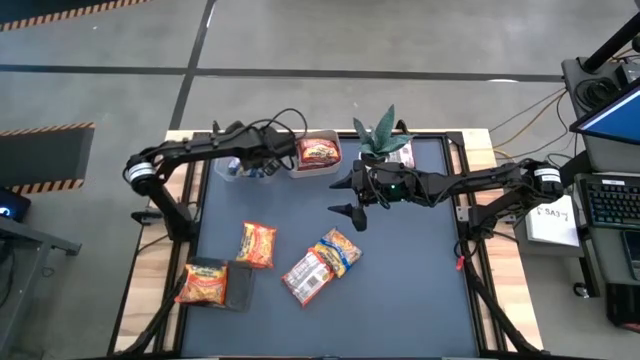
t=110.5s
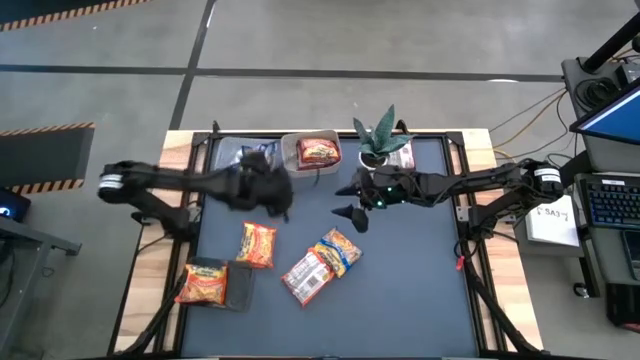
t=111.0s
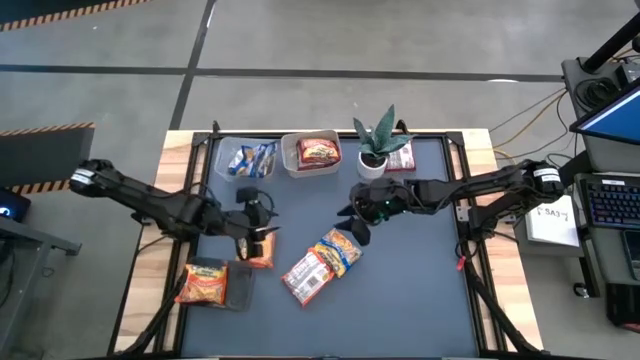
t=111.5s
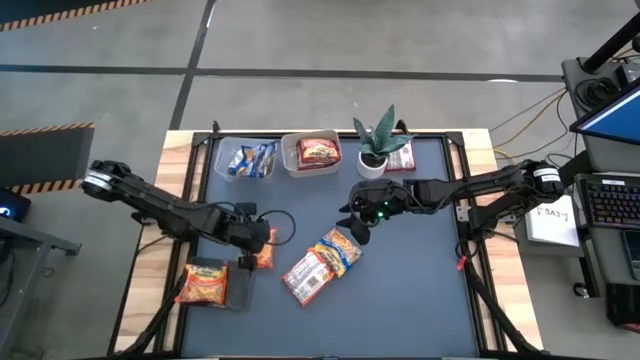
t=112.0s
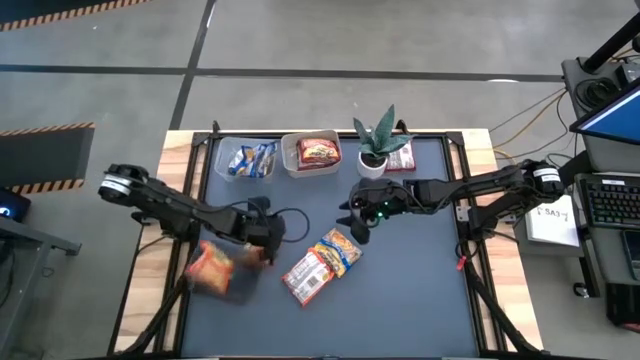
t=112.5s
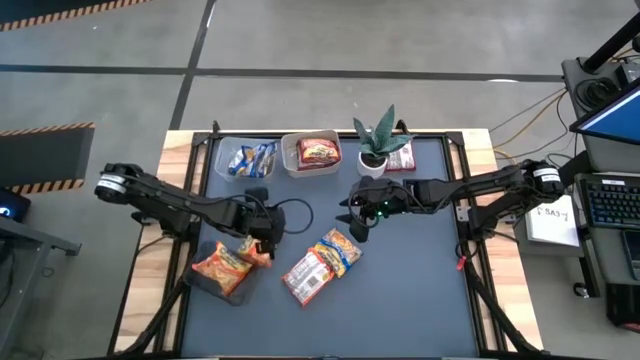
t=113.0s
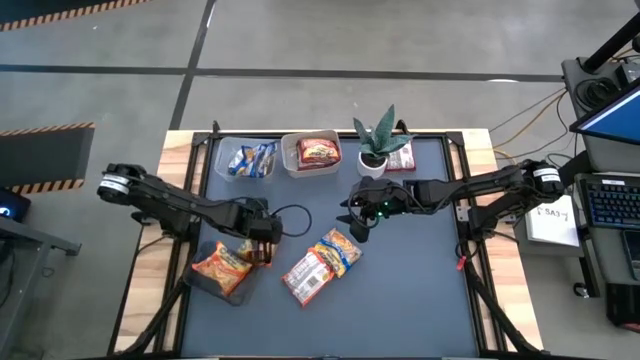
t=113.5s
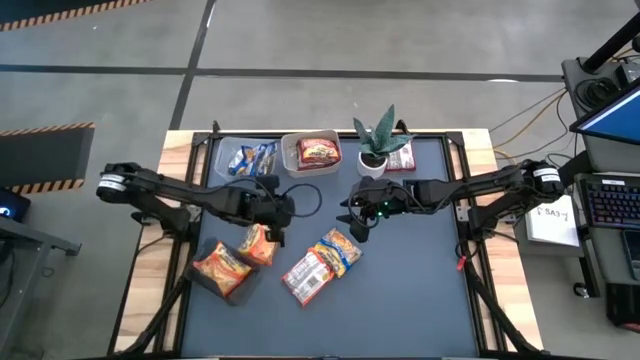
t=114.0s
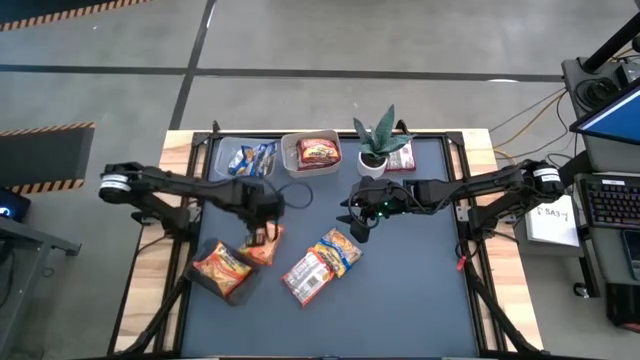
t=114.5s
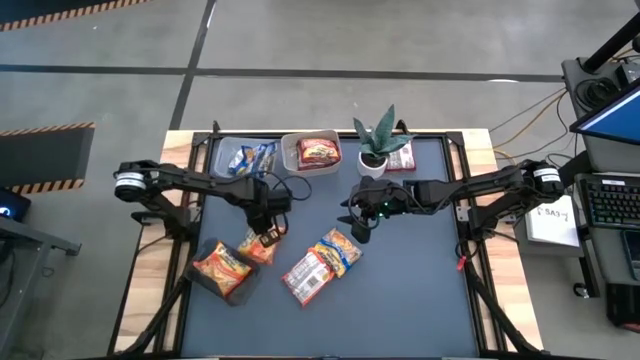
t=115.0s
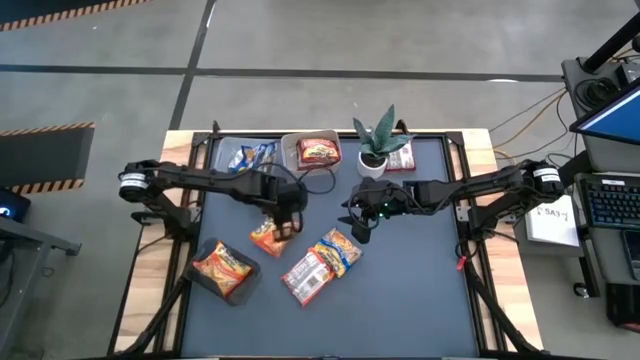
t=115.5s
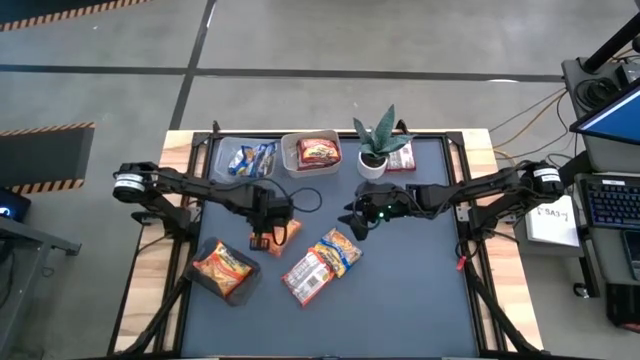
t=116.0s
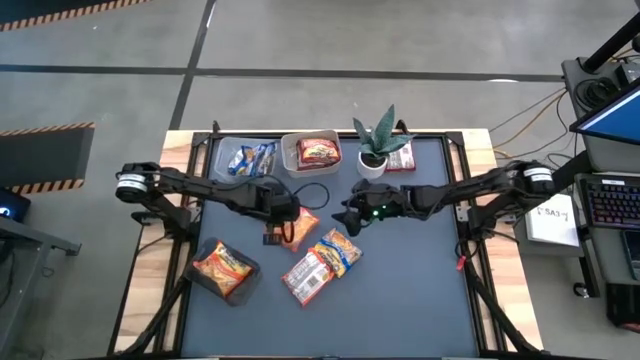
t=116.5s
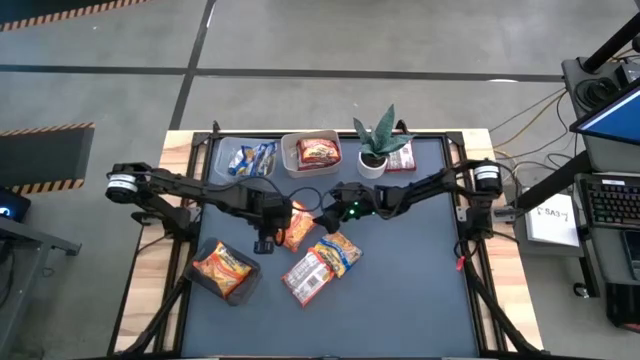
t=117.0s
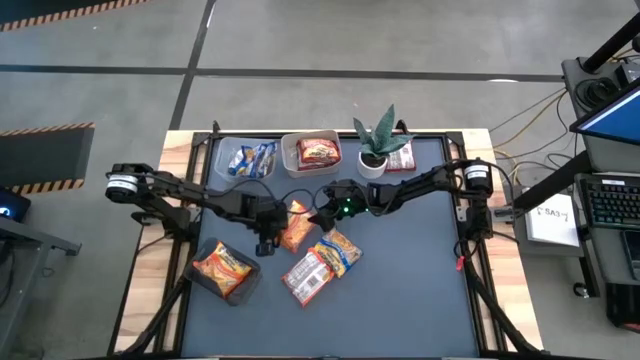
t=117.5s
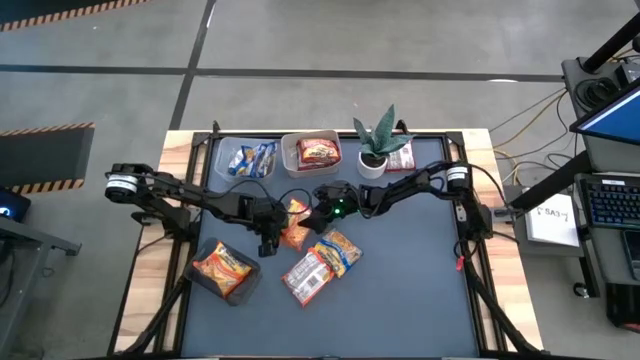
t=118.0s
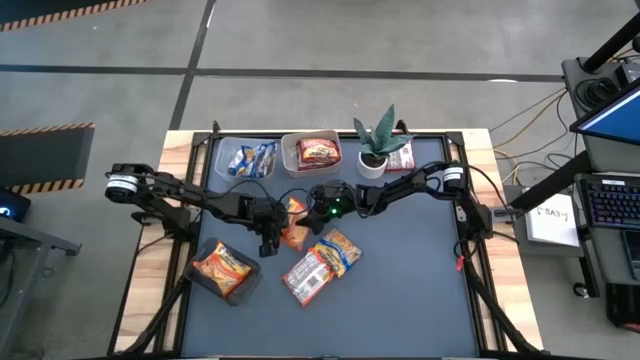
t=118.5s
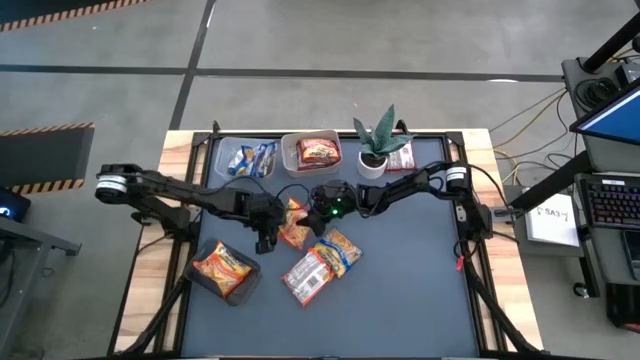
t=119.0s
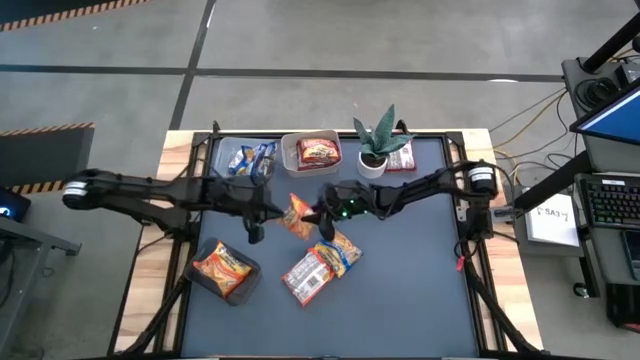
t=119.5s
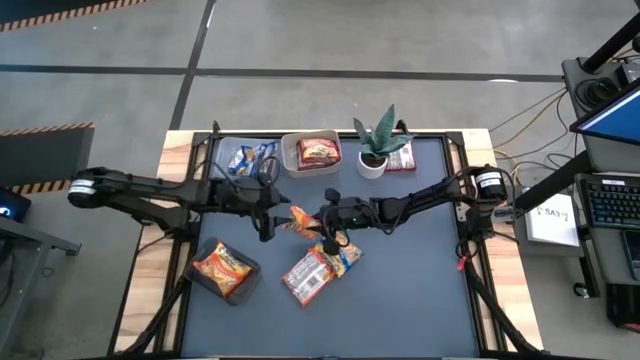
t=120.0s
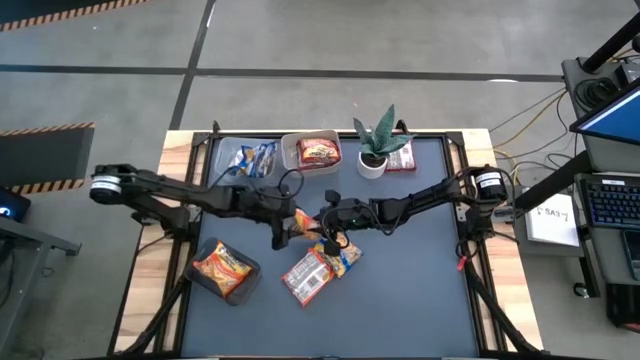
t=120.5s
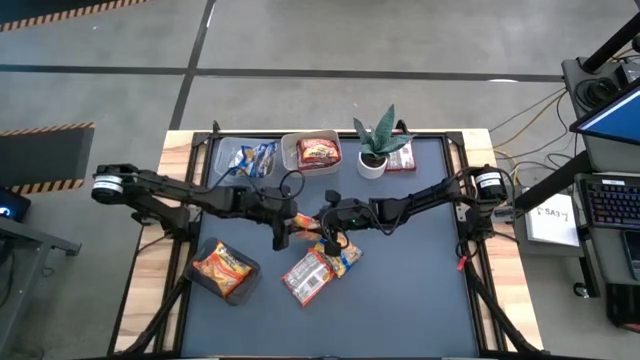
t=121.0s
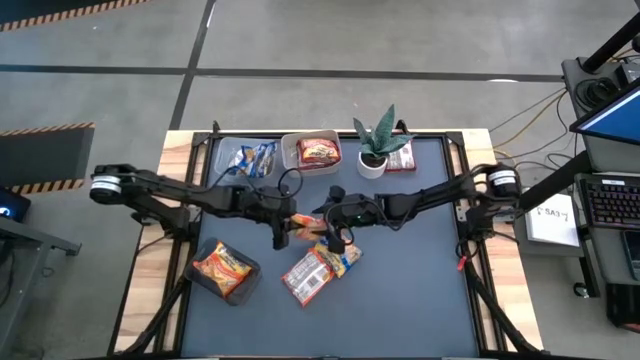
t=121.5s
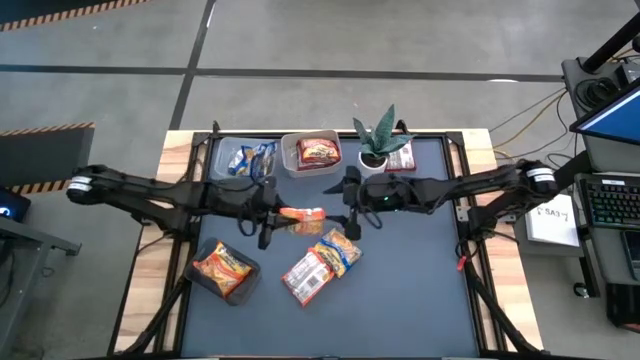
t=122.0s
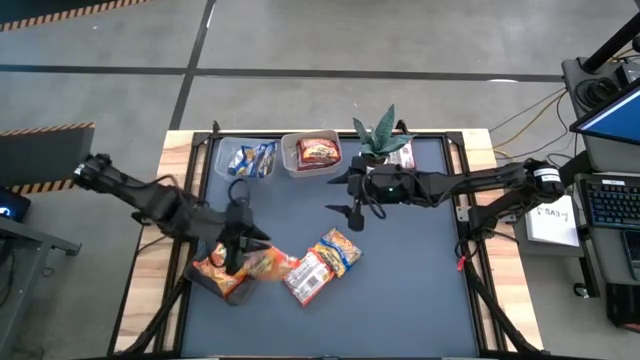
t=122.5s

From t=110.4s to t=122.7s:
Task: Sort Maruchan noodles
Put the orange noodle pack into the black bin

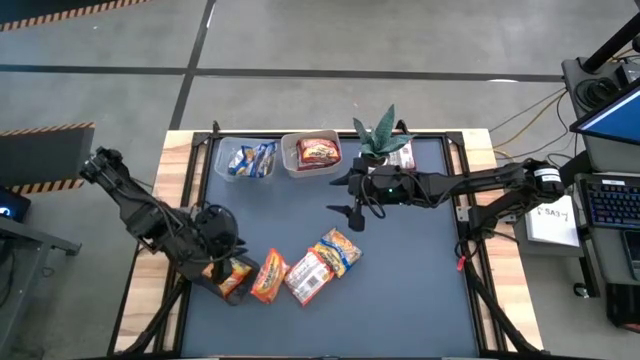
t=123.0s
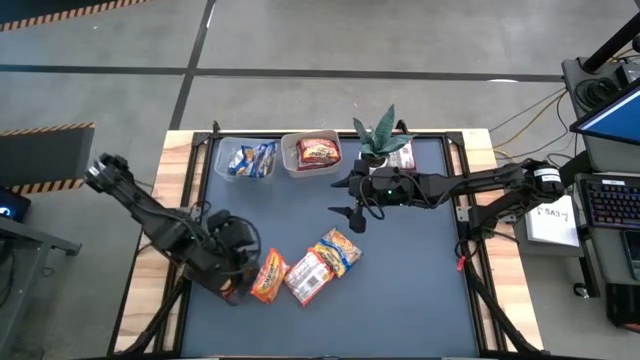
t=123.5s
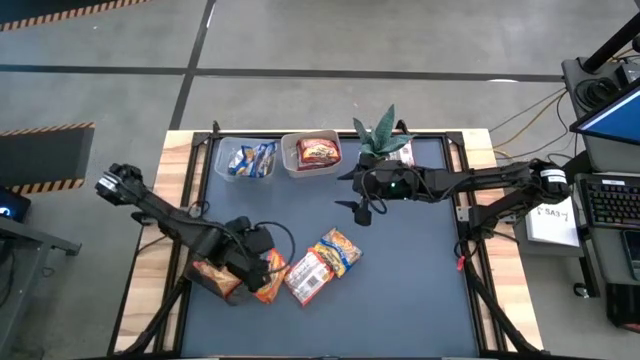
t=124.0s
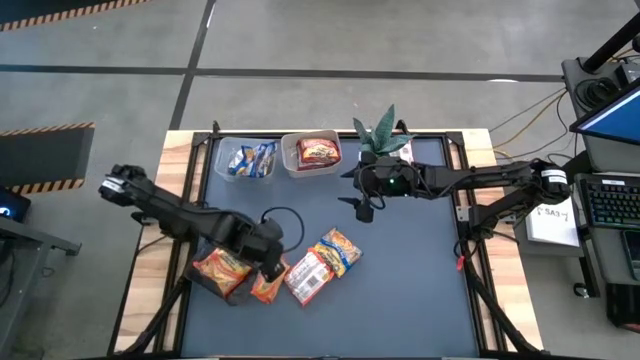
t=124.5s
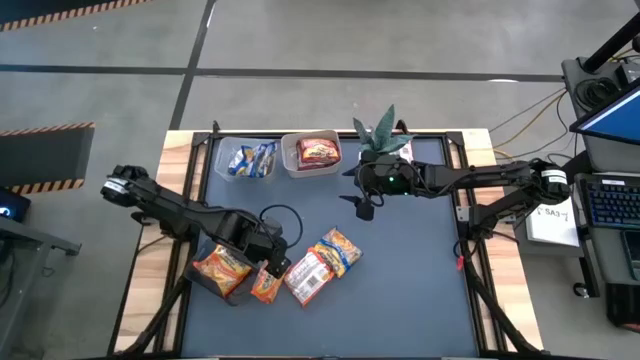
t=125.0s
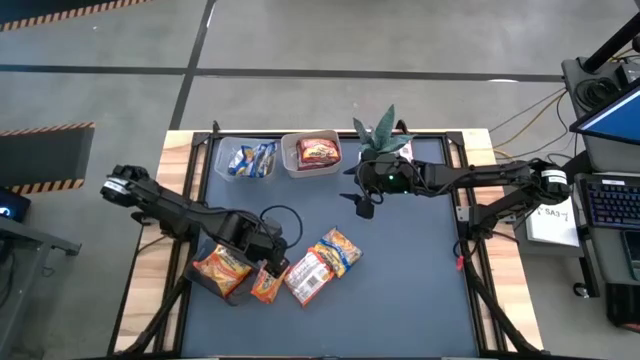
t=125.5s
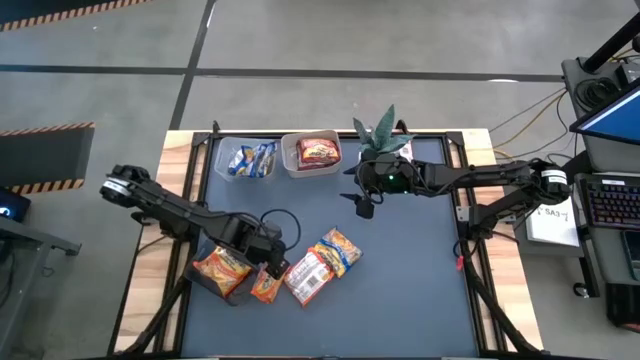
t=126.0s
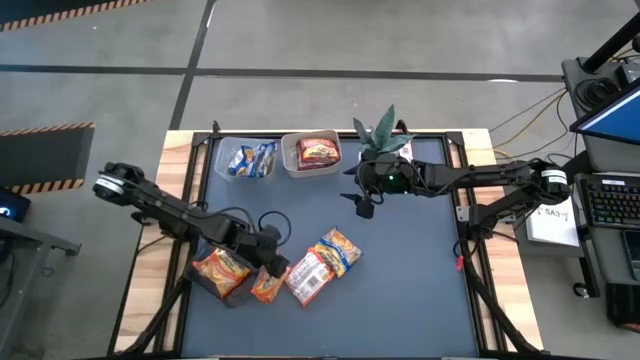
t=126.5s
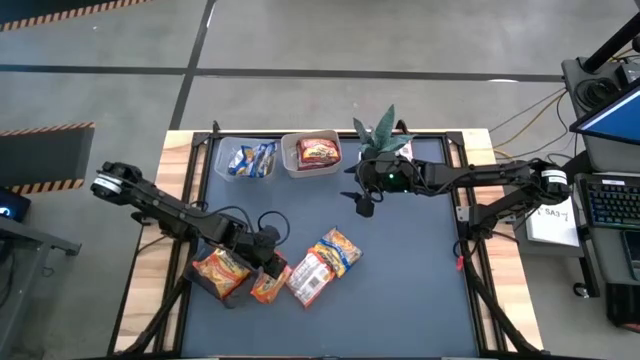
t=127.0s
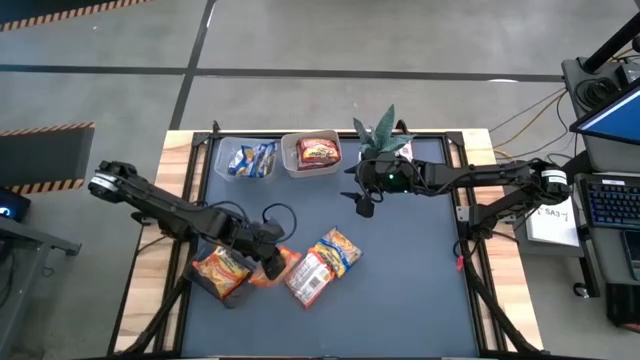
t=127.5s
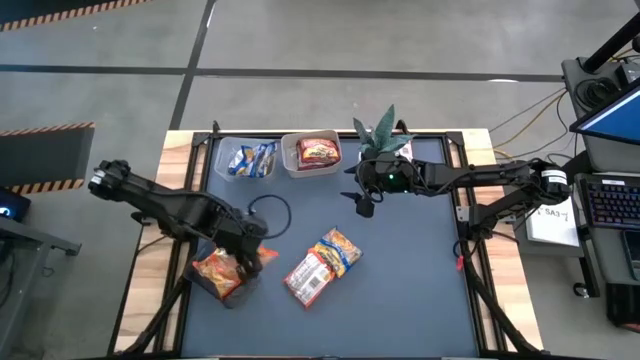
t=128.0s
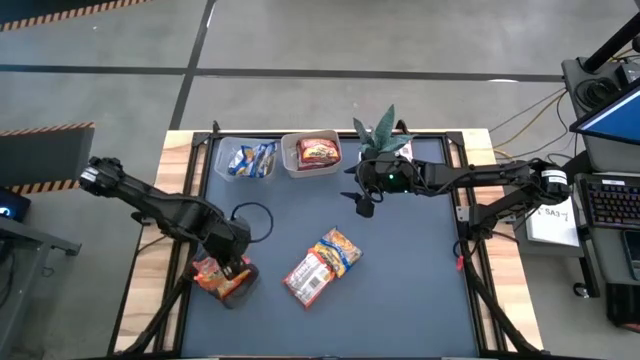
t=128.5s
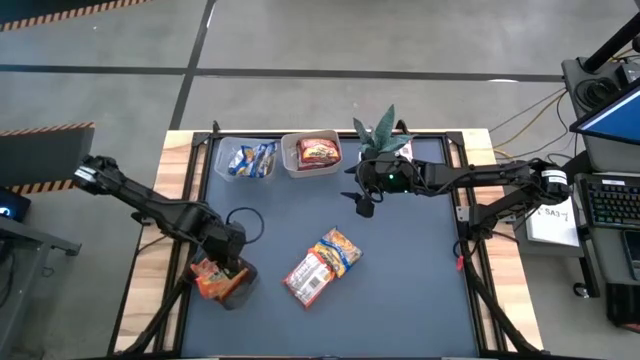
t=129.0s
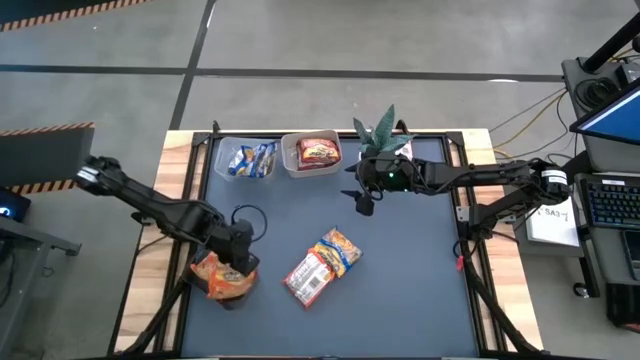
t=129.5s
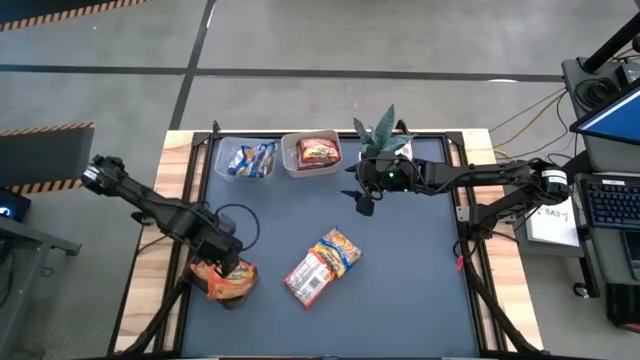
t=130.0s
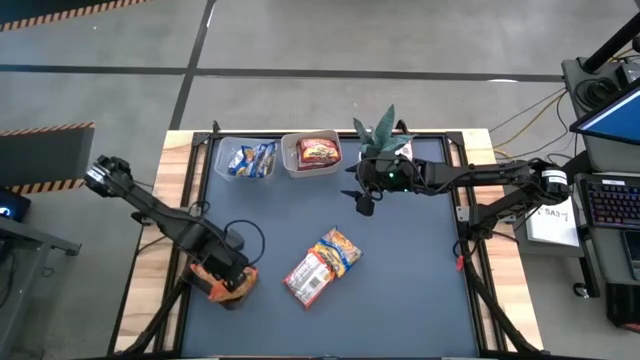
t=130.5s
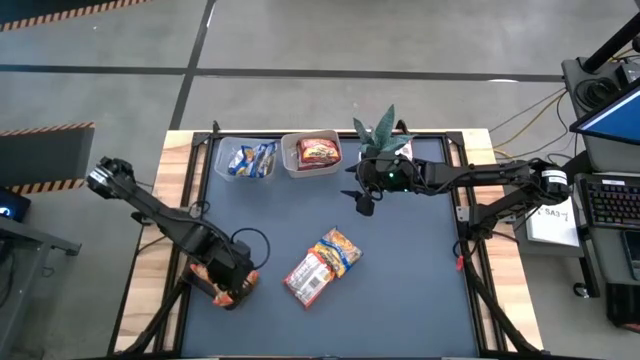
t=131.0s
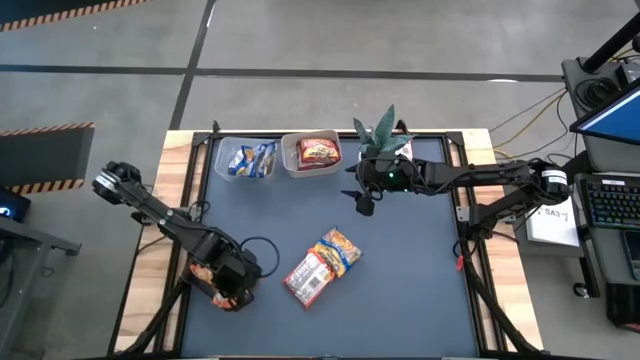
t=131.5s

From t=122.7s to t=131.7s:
Put the orange noodle pack into the black bin
